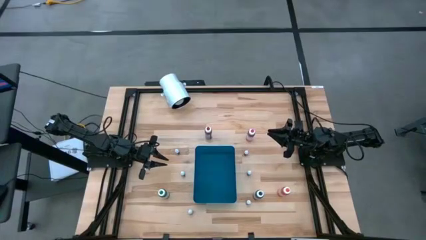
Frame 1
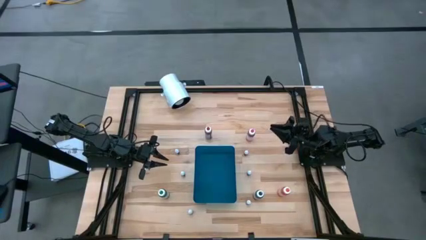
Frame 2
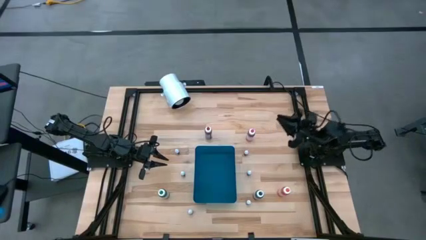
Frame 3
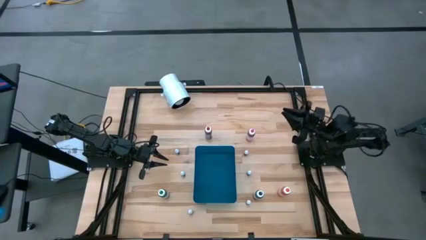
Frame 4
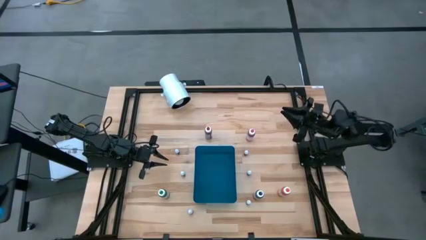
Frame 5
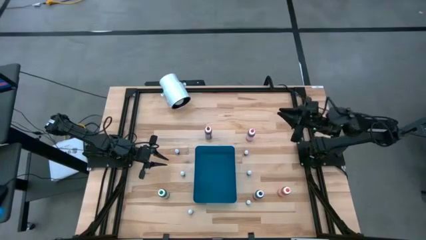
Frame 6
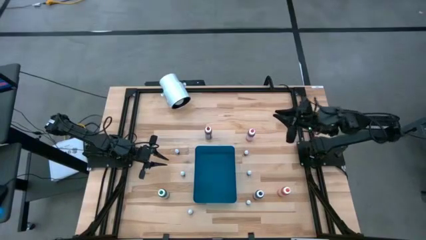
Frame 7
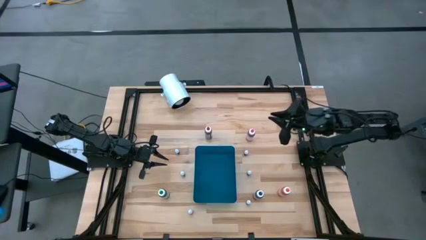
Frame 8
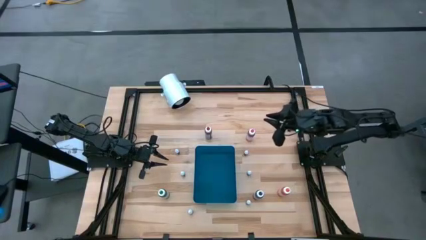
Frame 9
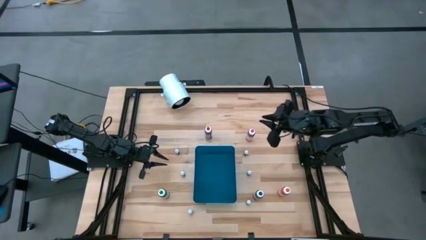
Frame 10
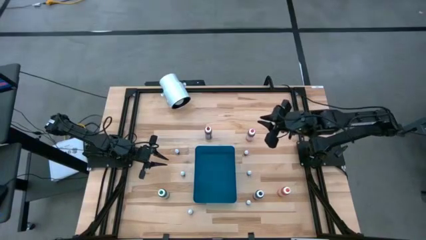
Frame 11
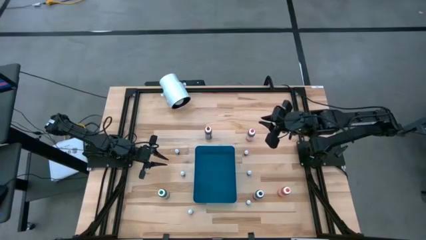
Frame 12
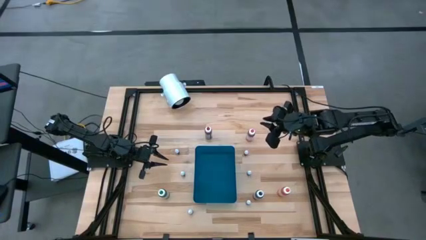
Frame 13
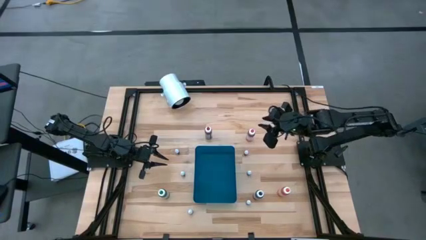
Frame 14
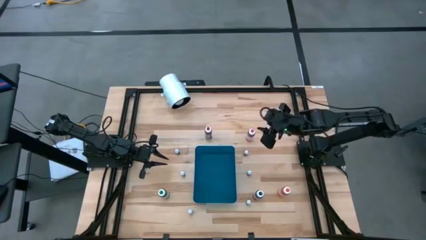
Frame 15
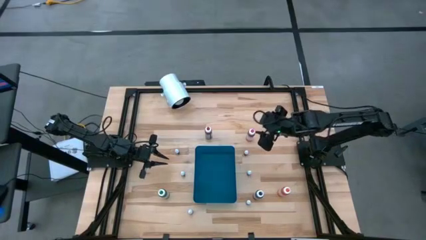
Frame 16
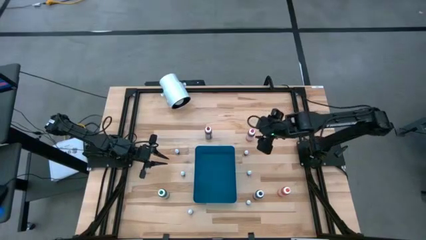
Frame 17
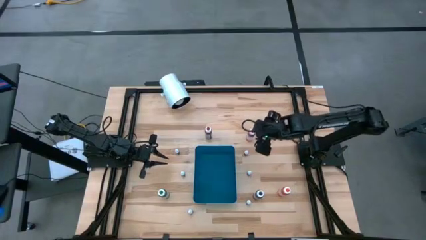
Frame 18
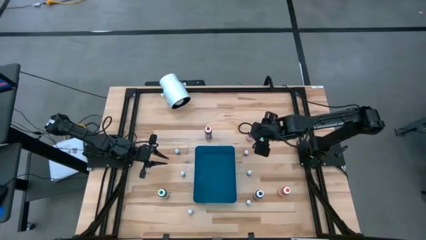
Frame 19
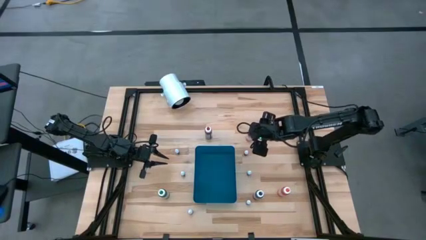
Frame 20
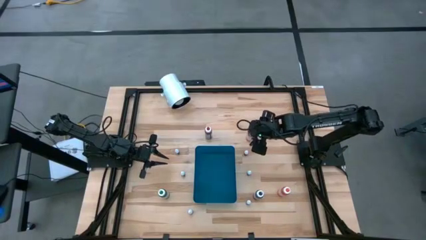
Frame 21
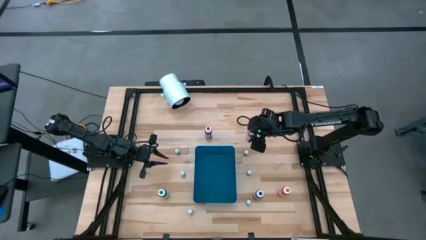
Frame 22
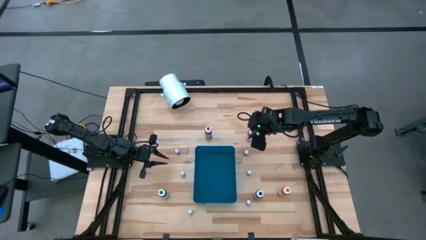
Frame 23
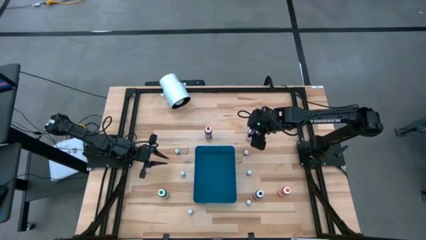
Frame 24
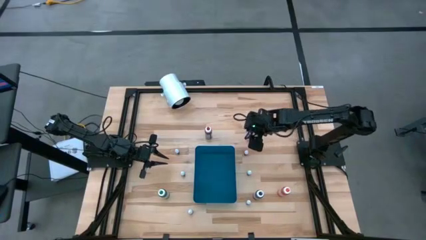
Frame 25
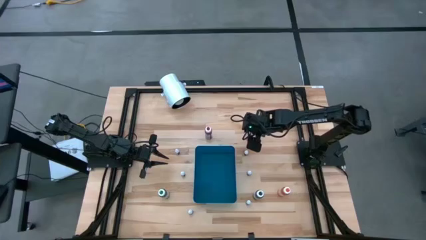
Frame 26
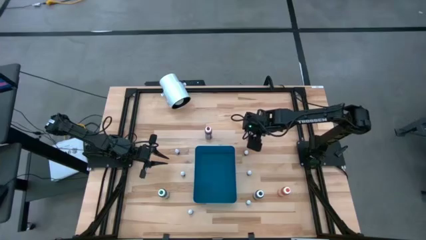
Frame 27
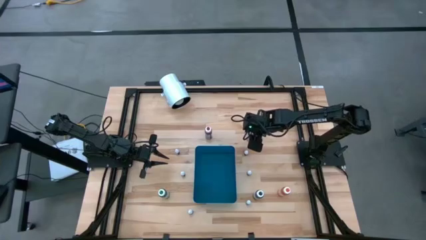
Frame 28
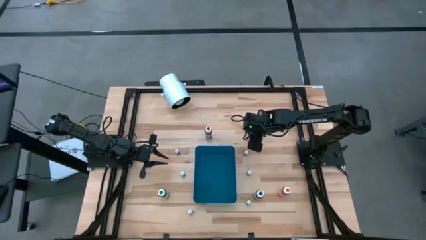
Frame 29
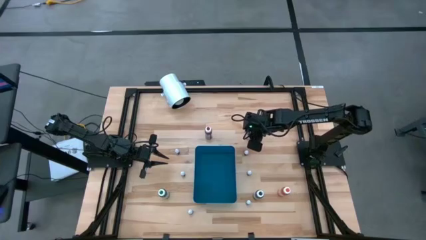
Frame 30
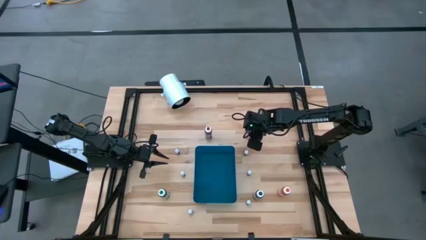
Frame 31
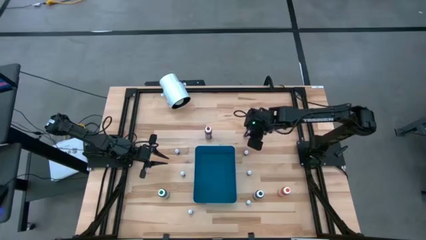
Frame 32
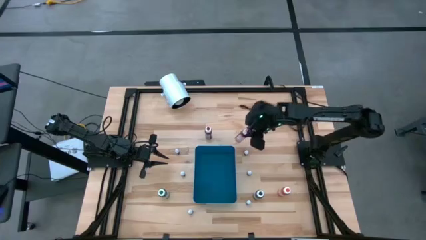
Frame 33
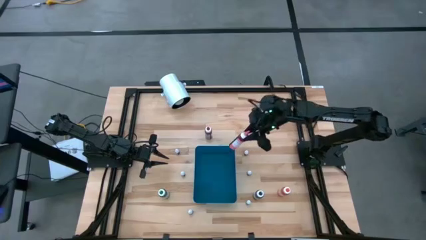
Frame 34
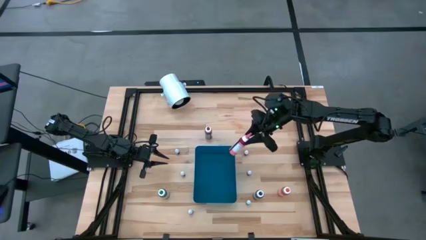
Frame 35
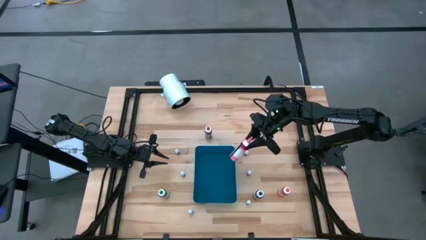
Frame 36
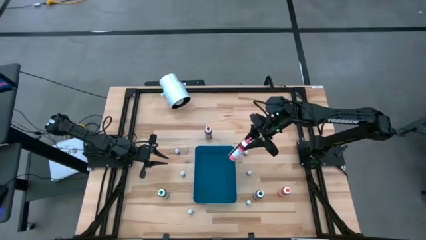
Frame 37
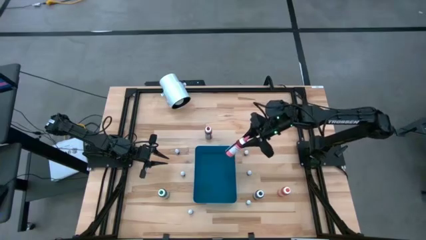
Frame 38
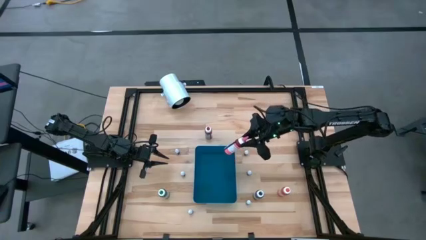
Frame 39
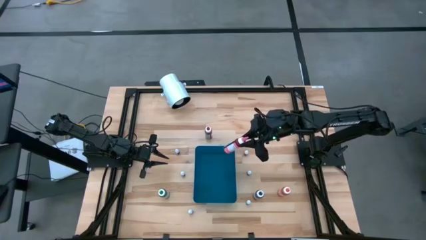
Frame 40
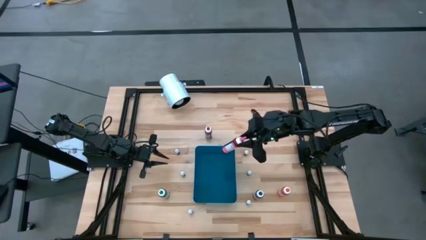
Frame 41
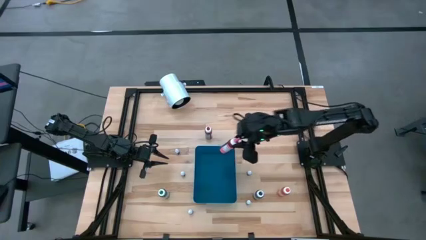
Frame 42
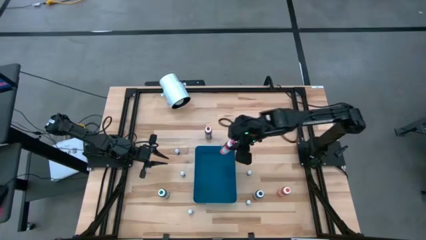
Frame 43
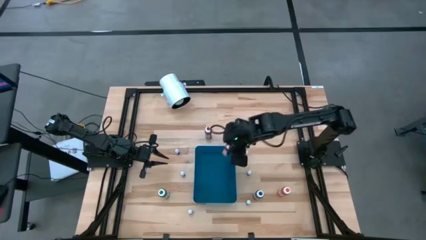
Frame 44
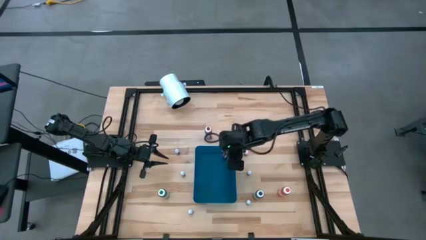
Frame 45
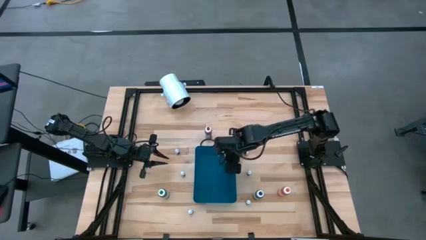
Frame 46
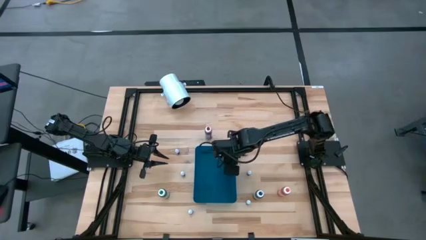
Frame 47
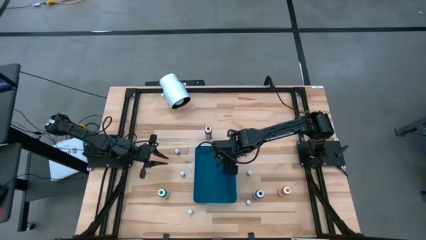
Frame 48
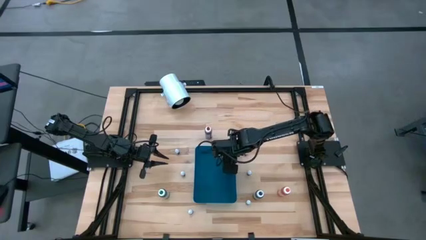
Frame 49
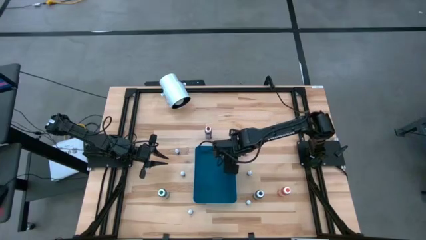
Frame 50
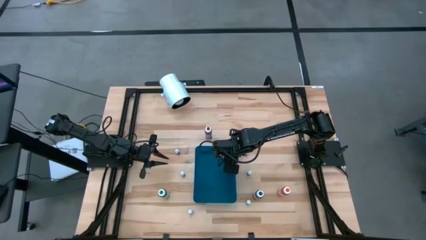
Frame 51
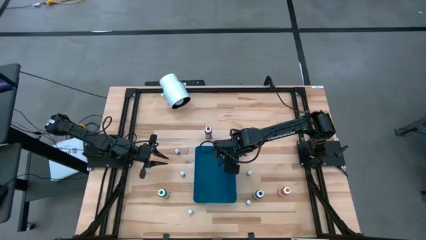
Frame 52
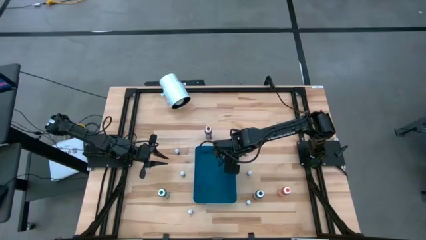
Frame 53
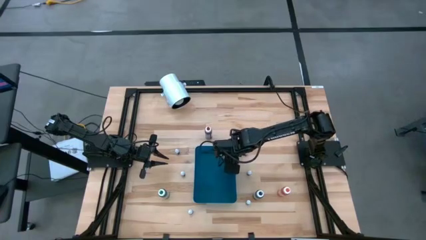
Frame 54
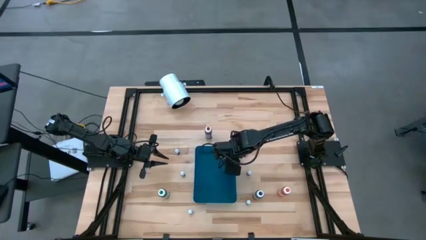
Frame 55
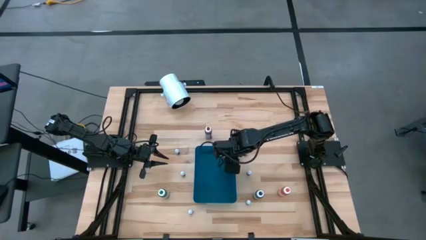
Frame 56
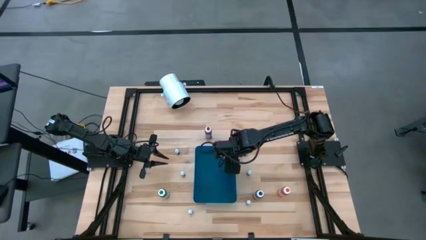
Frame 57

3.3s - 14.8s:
Task: Pick & Place food coloring
Put the big pink food coloring bottle into the blue container

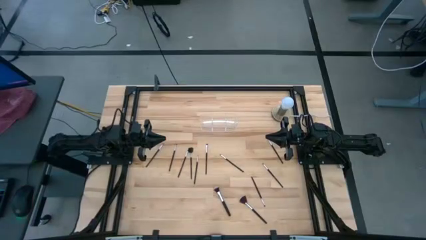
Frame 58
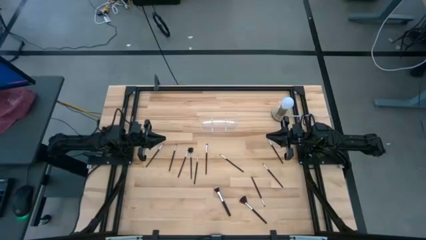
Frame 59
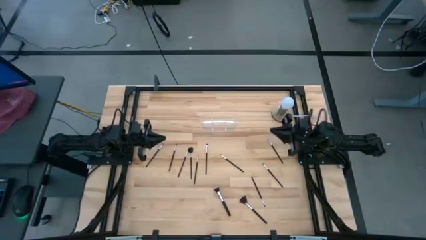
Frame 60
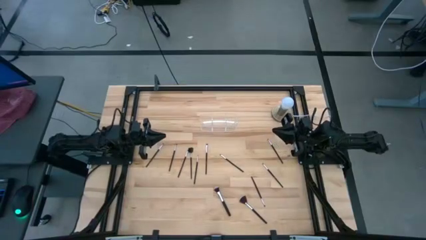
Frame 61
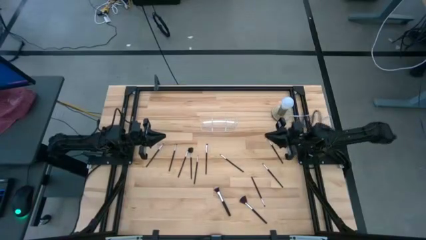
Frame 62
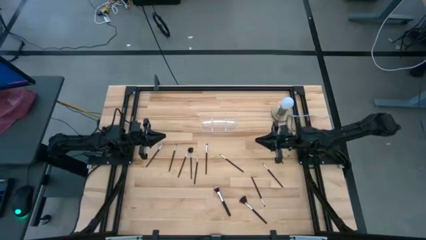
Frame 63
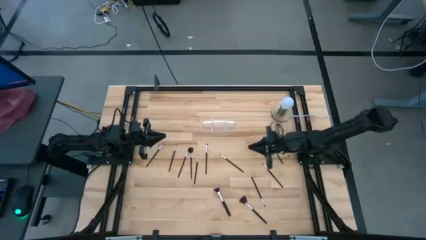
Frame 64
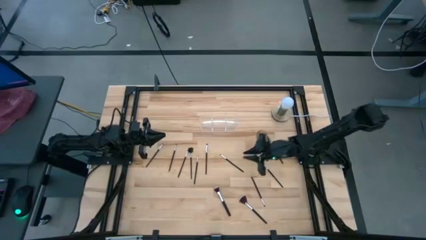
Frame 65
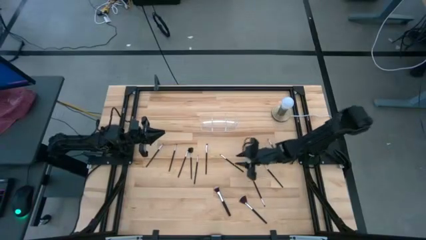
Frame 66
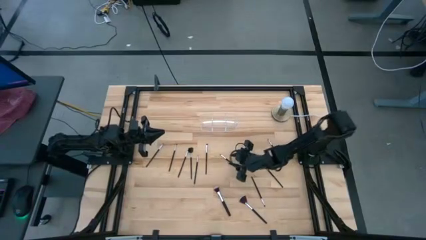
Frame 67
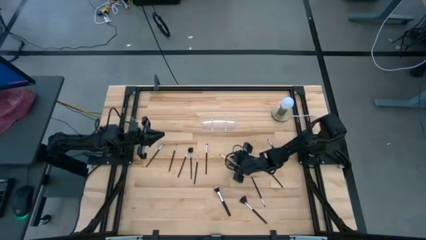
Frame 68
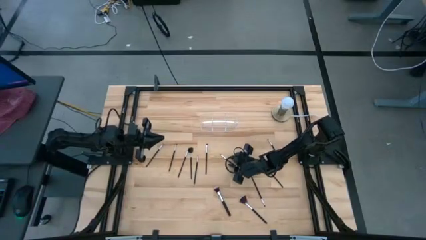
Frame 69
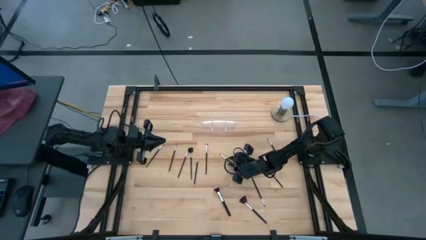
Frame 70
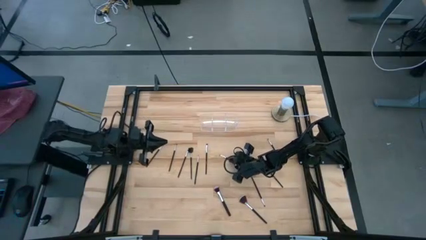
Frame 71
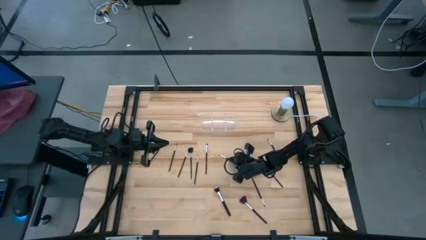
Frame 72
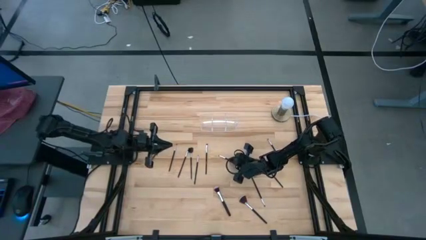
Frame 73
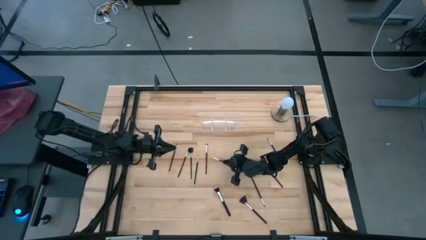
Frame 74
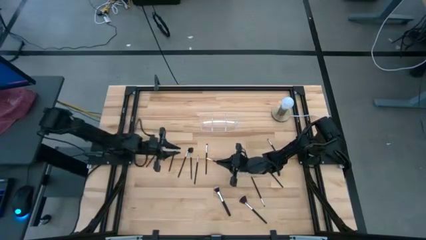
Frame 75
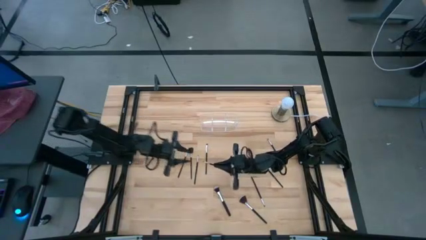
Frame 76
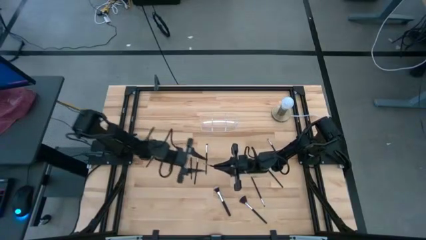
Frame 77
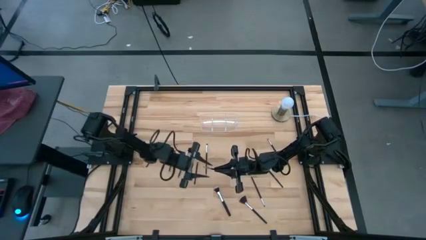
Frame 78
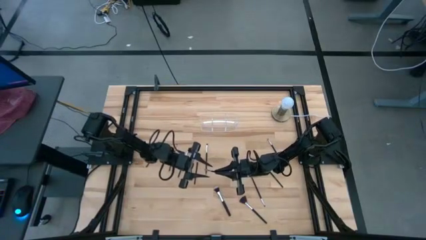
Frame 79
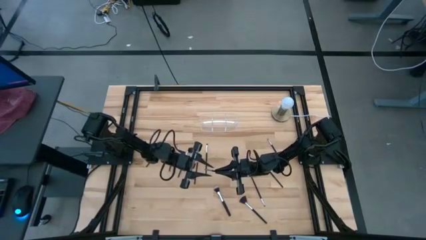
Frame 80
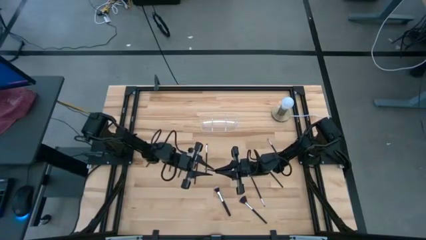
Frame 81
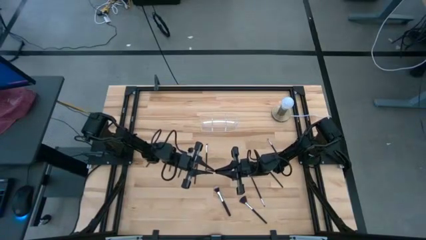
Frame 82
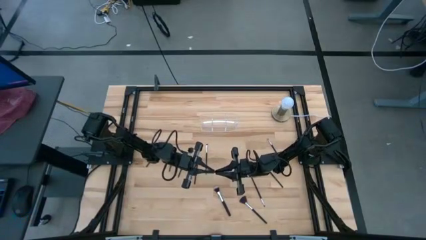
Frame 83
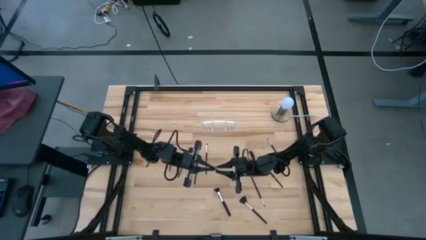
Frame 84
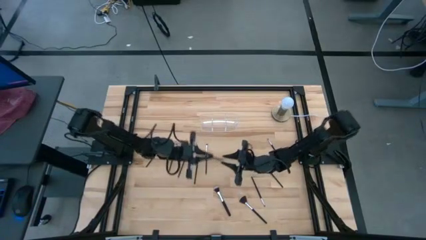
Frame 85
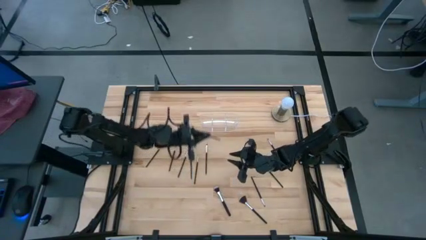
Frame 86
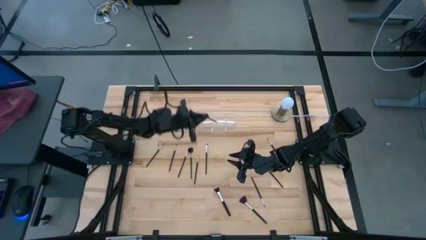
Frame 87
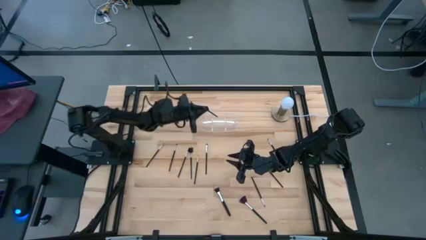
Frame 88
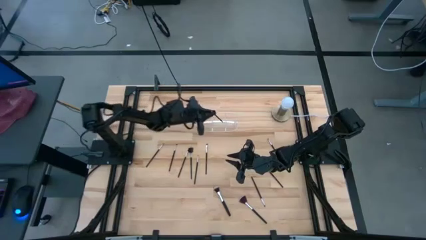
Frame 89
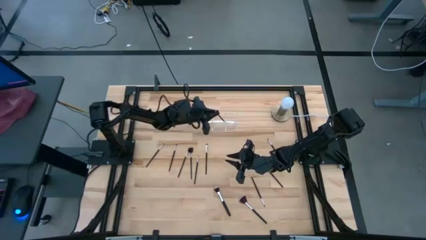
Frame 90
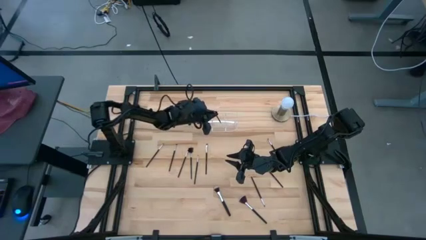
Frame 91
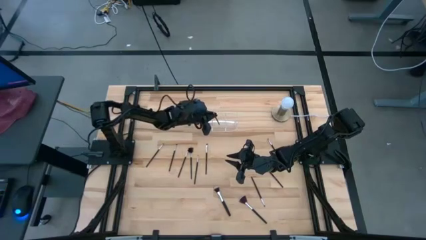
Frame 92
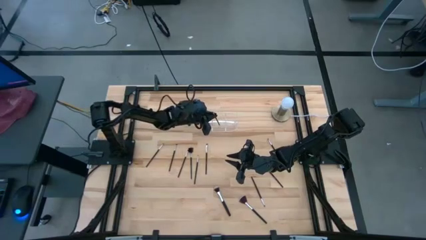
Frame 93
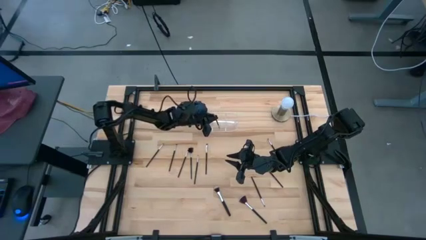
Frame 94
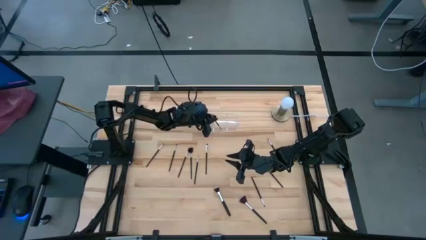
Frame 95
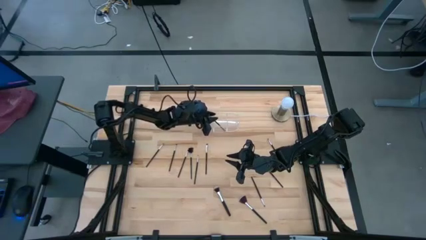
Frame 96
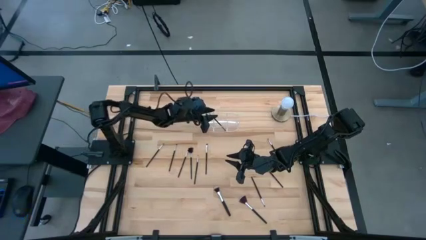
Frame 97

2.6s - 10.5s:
Task: Put items in baskets/containers
Put the black eyeshadow brush into the transparent organizer
